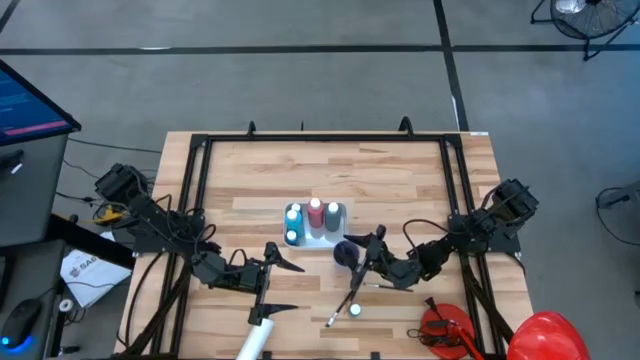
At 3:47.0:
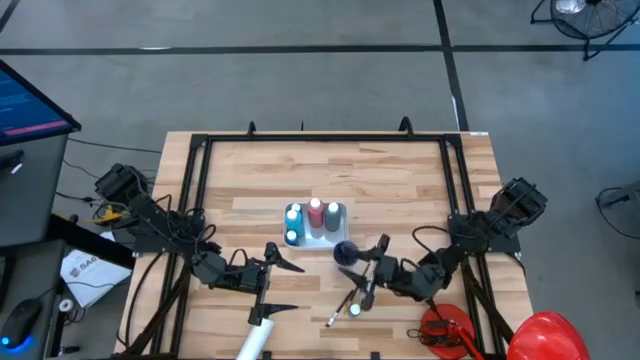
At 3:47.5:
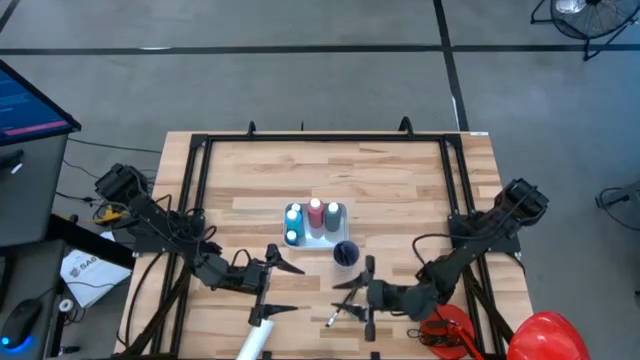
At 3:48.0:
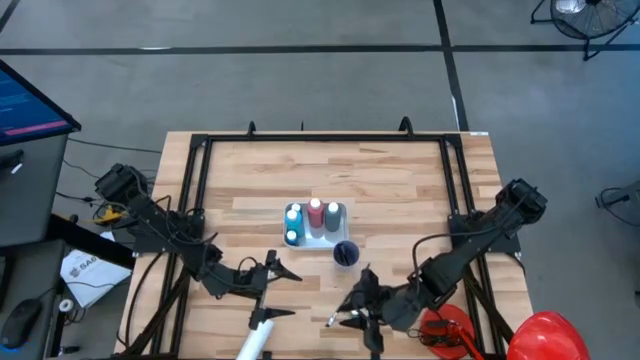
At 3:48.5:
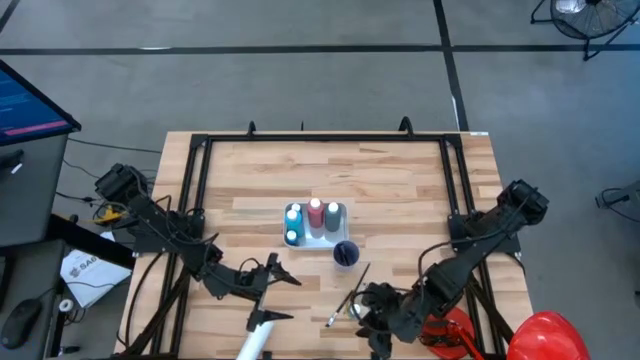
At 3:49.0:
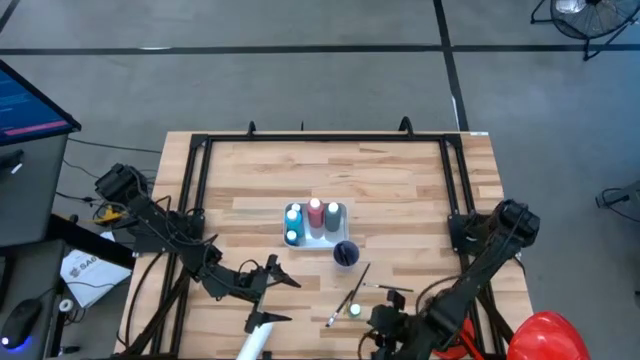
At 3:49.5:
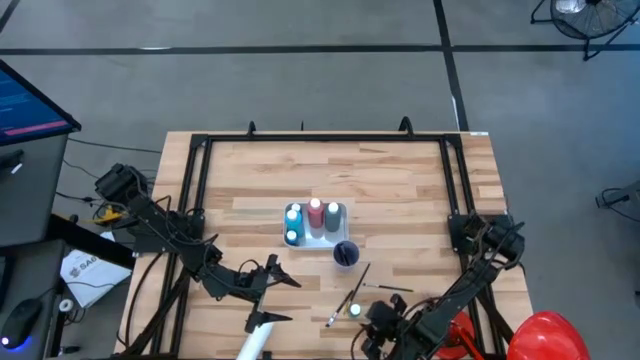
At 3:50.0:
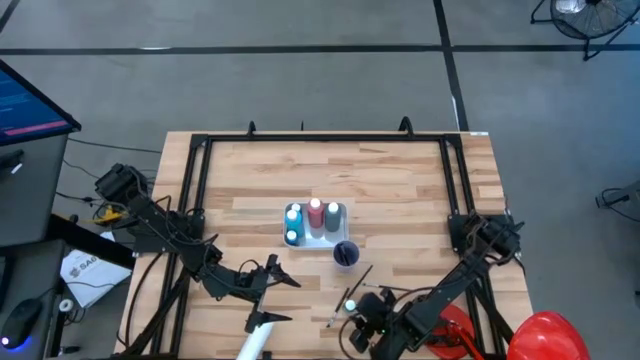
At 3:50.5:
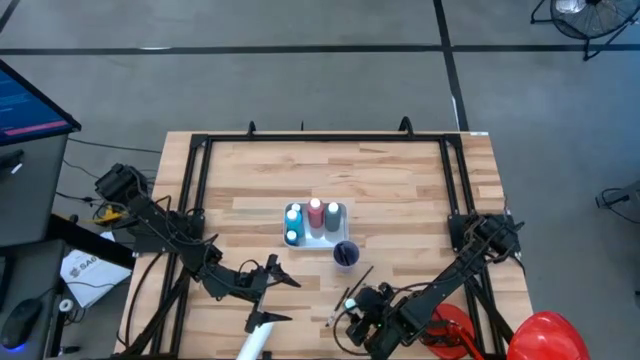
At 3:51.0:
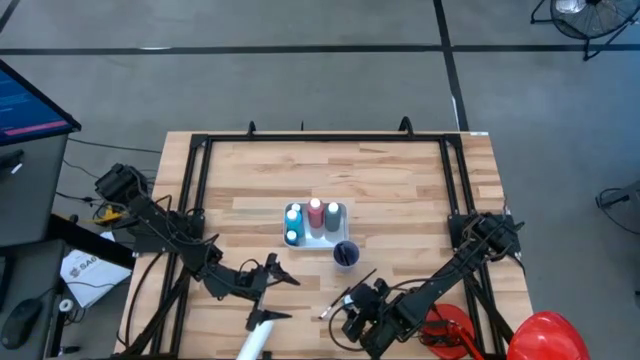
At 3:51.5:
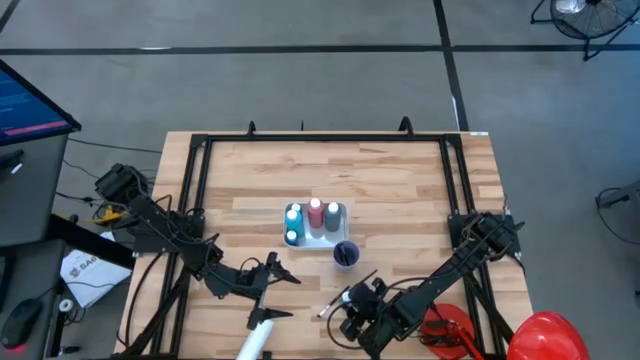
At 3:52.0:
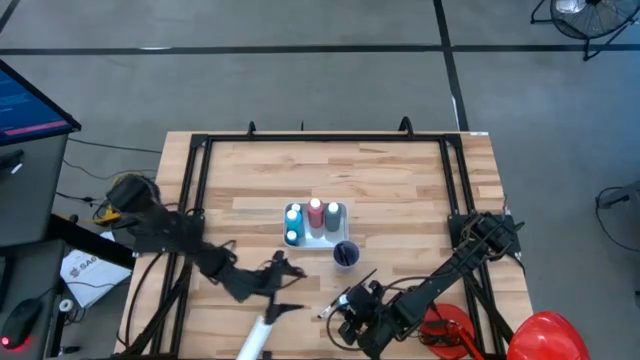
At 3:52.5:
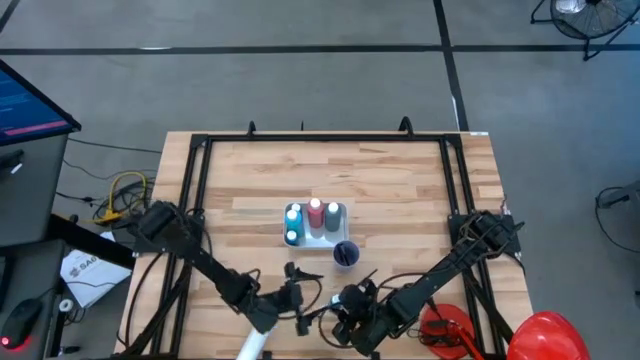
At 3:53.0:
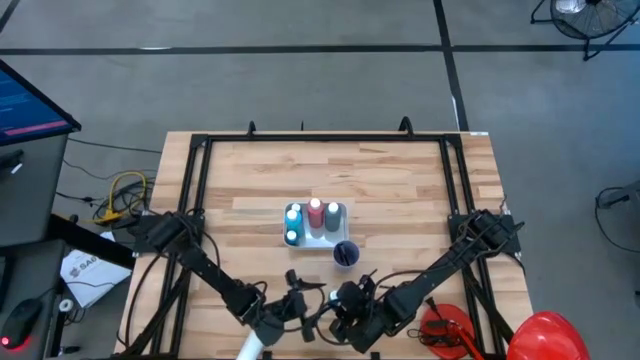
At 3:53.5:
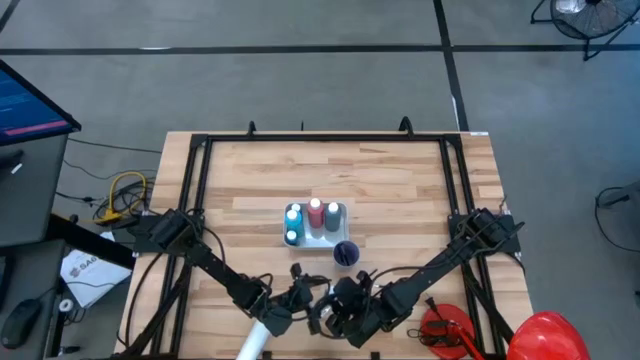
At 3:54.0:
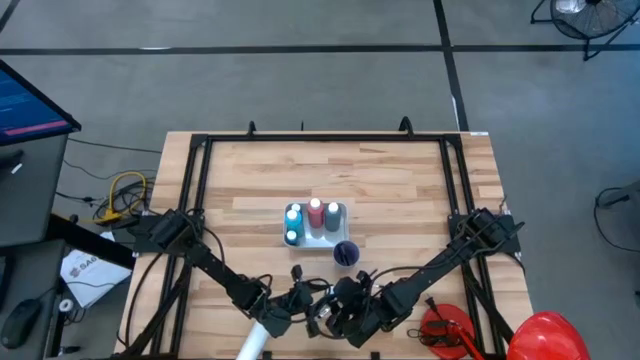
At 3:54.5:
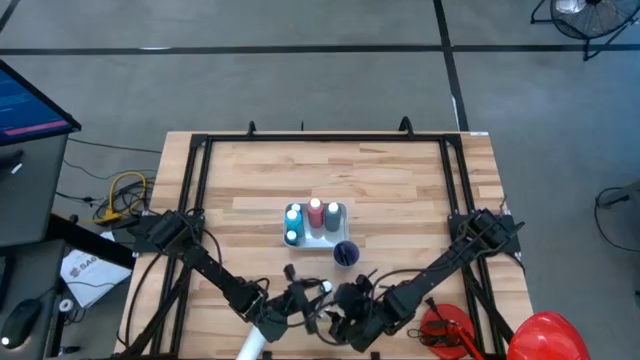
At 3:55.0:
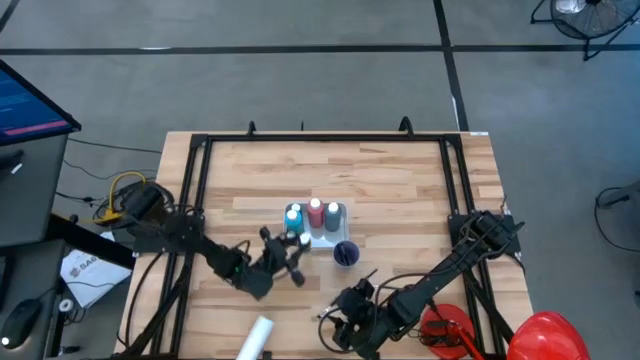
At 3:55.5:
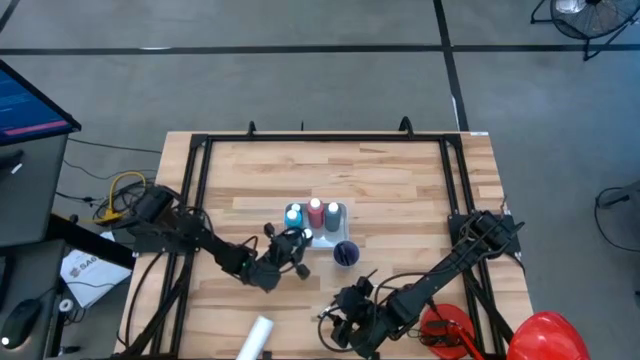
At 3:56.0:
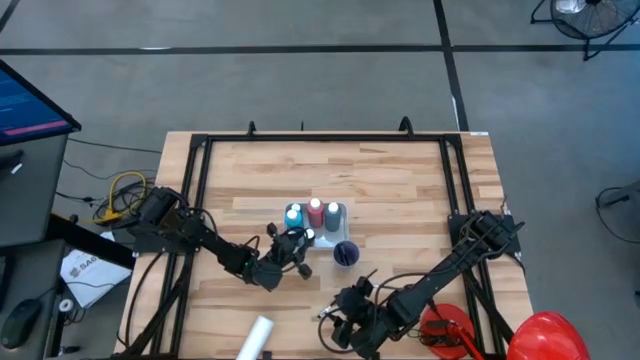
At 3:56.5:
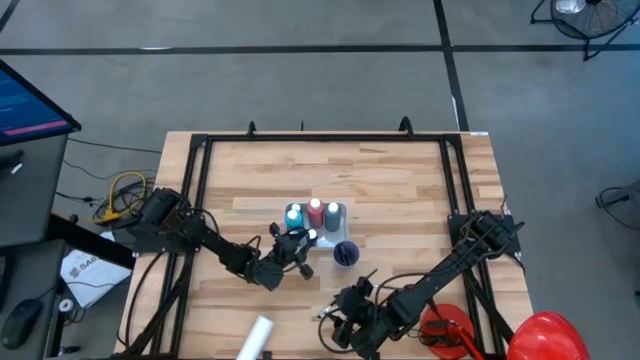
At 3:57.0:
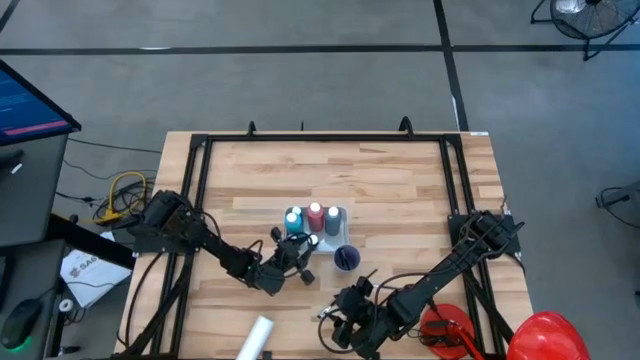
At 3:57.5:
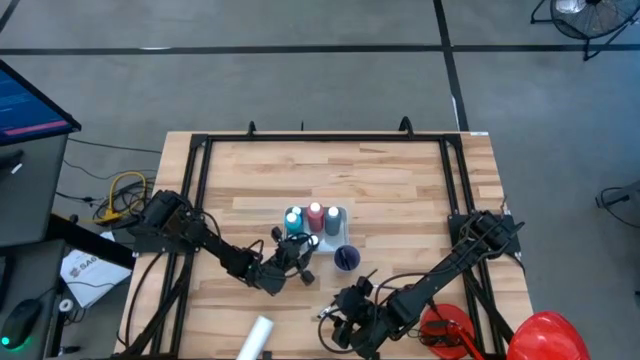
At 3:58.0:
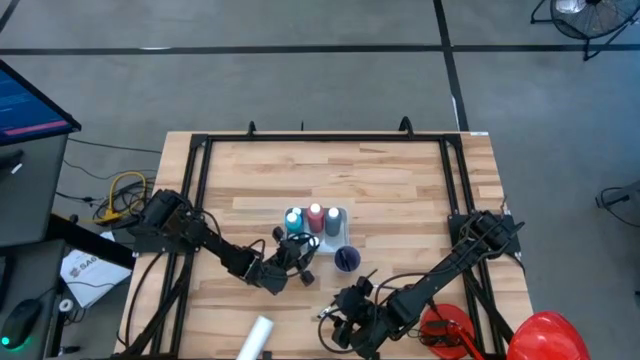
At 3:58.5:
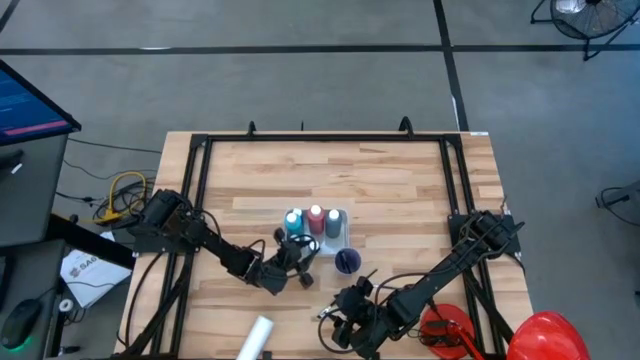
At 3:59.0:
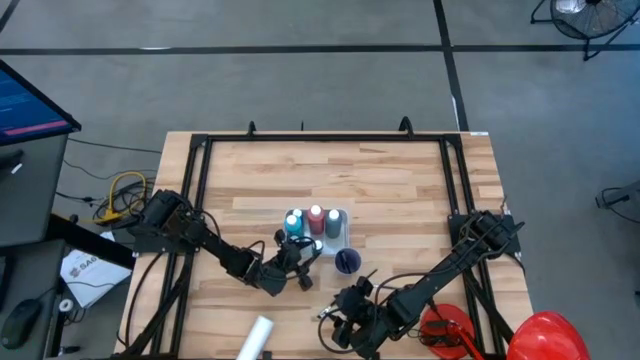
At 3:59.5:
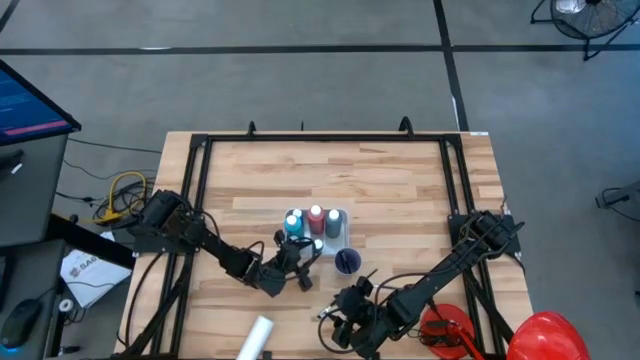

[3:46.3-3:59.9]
Task: Pick & Place Paint Supplies
Put the green paint bottle into the white bin

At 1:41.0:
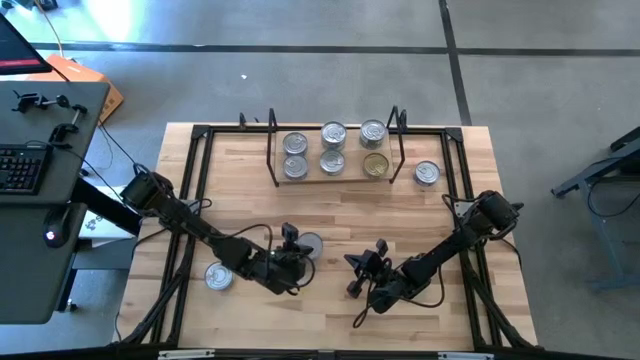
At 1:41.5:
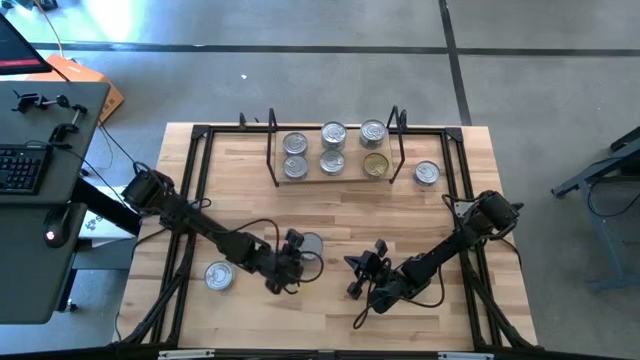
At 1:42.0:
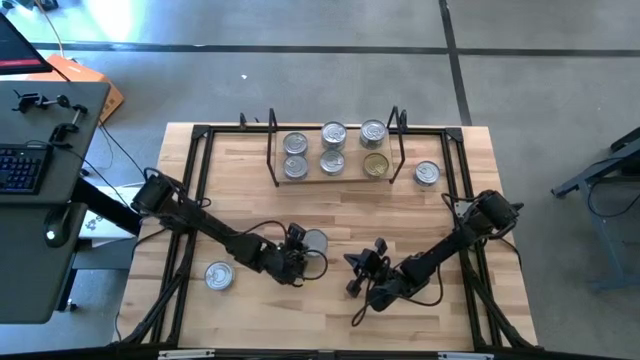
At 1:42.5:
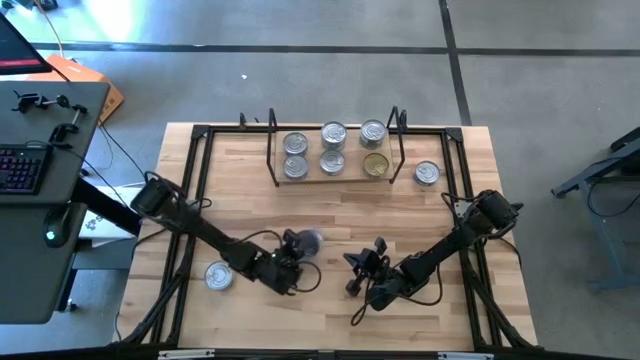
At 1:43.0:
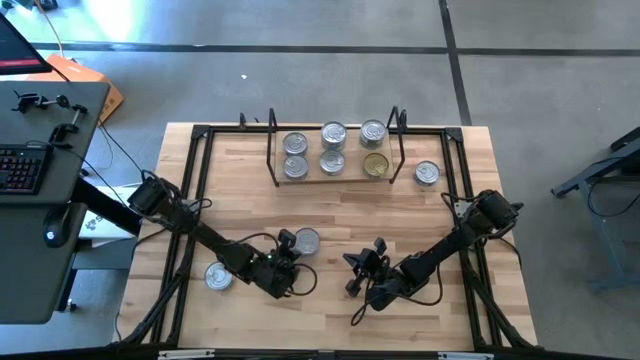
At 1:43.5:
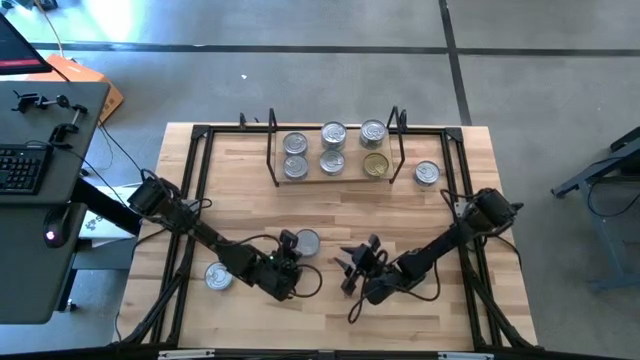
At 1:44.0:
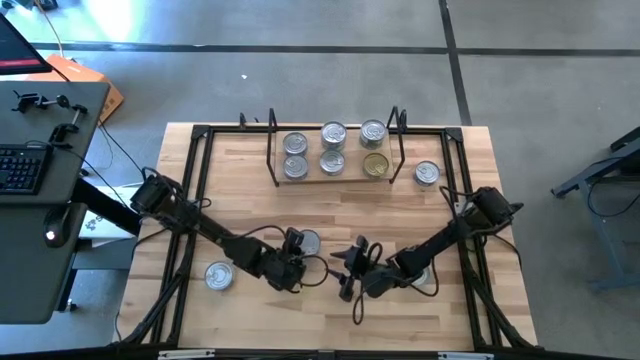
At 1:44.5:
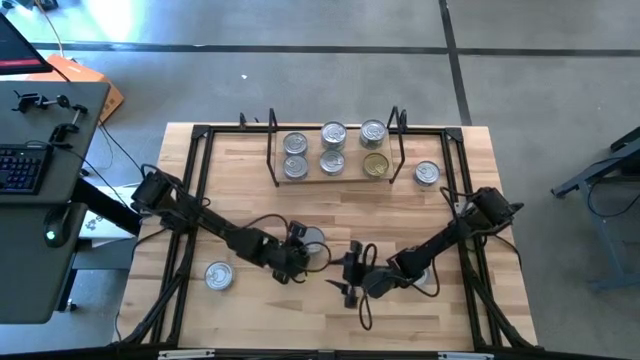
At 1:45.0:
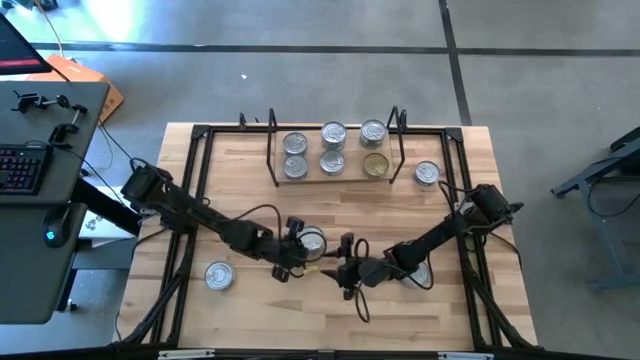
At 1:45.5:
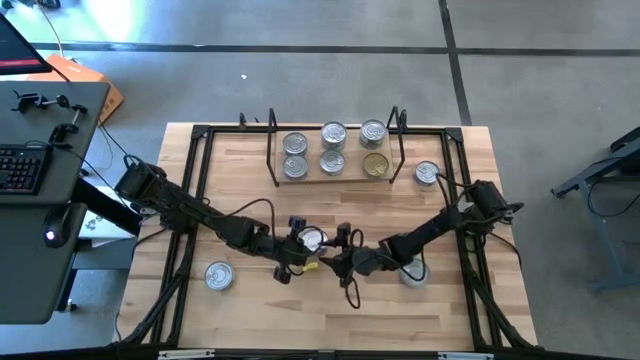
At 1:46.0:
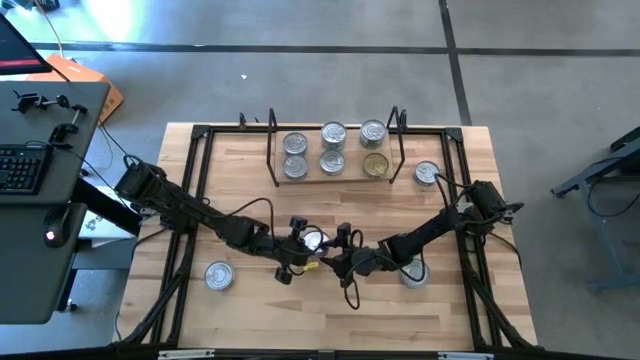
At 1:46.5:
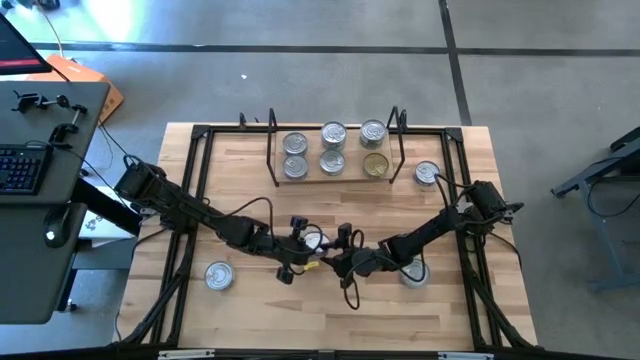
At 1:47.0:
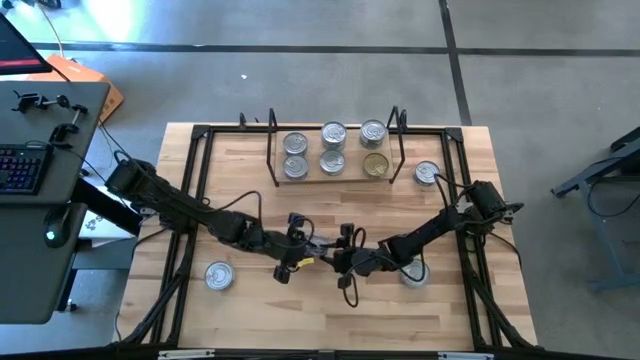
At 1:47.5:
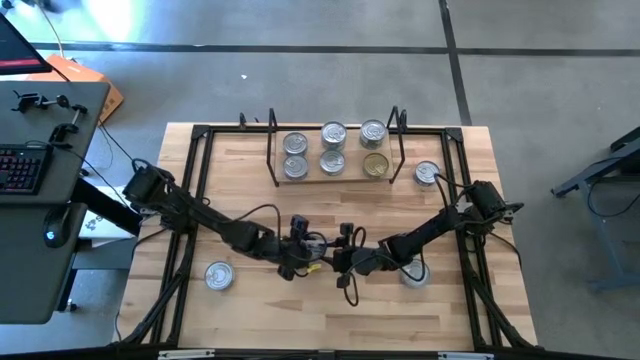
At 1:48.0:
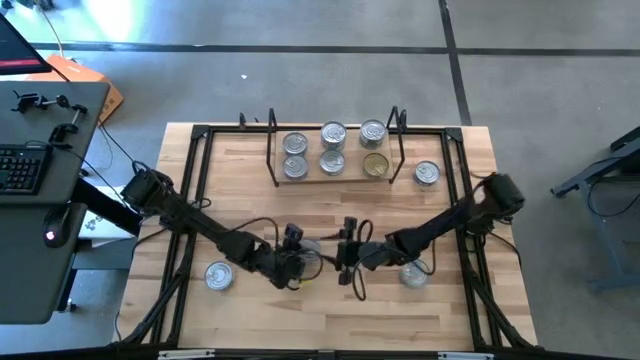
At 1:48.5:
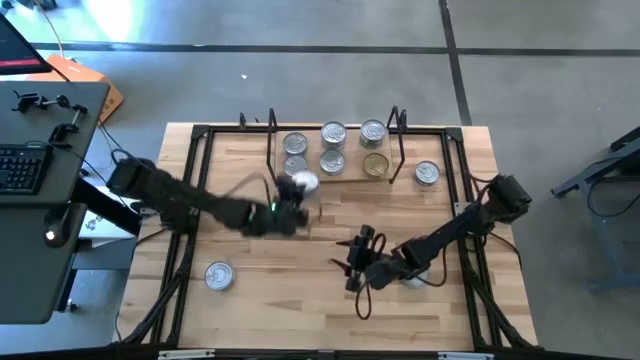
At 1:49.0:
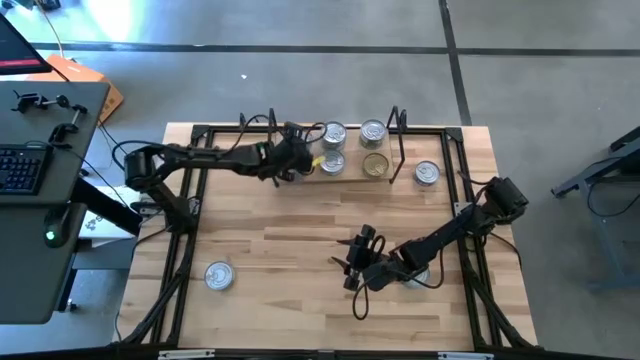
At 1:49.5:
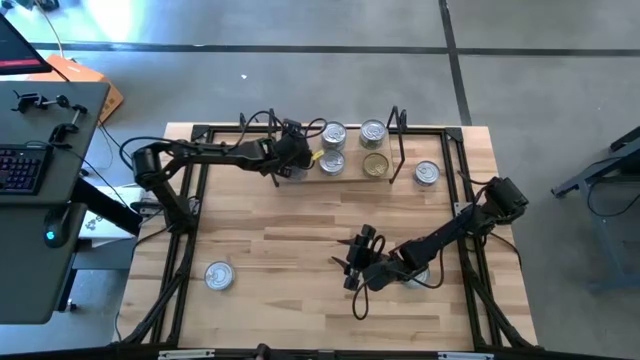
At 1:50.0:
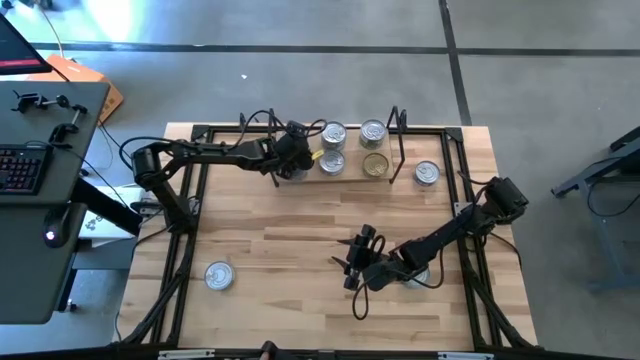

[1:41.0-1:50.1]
Task: Stack canned seafood by type on shelf
Stack the blue tuna can on top of the blue tuna can on the shelf
